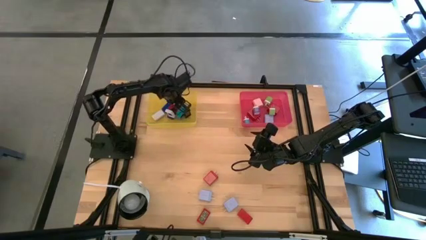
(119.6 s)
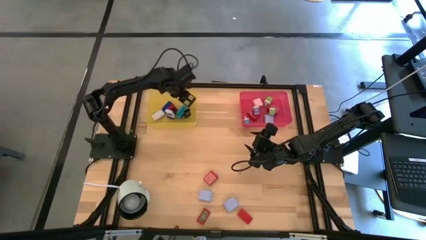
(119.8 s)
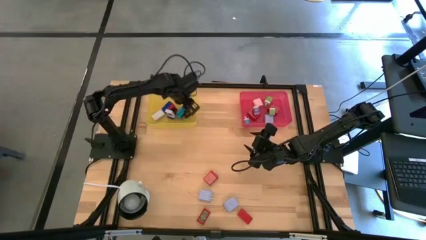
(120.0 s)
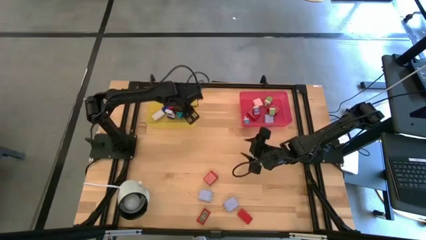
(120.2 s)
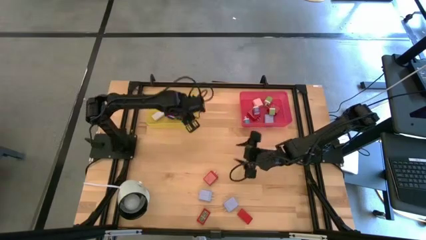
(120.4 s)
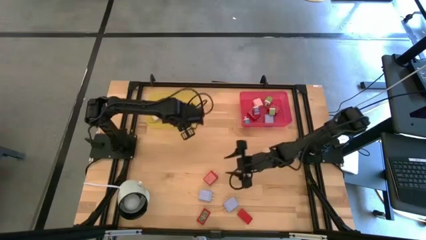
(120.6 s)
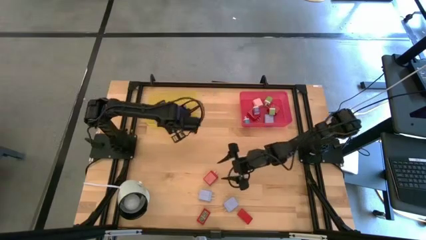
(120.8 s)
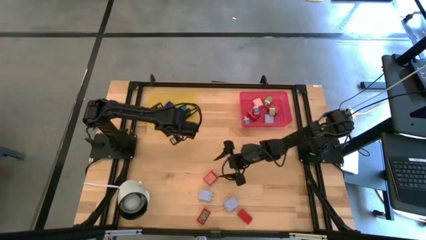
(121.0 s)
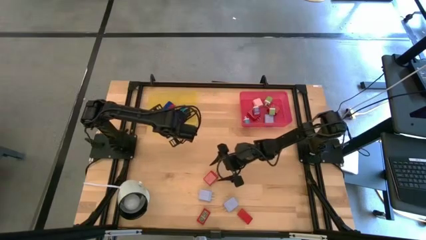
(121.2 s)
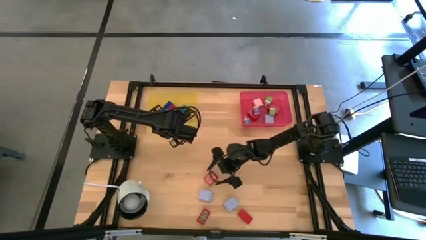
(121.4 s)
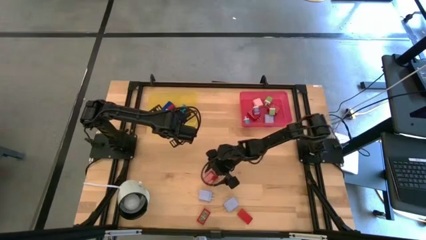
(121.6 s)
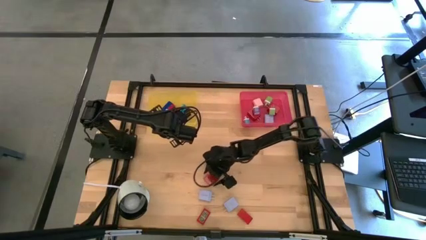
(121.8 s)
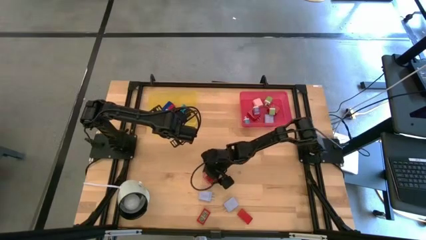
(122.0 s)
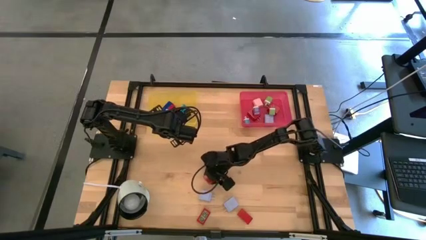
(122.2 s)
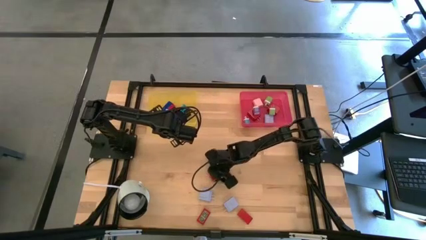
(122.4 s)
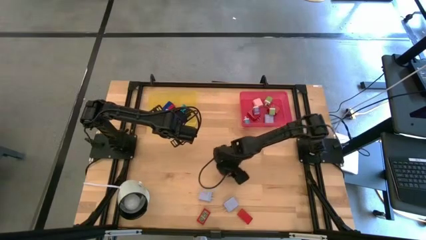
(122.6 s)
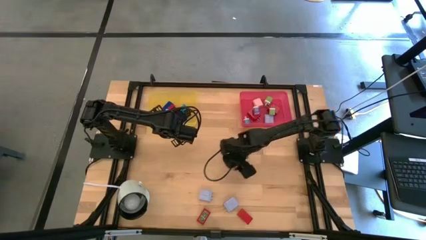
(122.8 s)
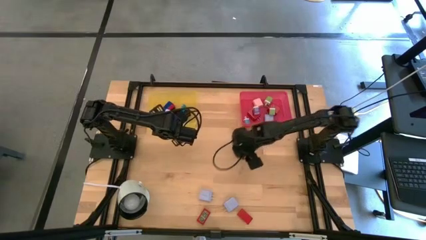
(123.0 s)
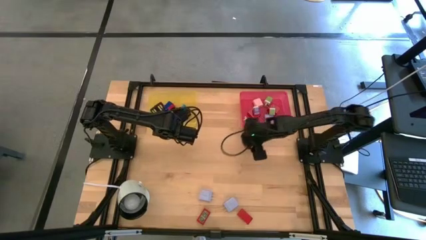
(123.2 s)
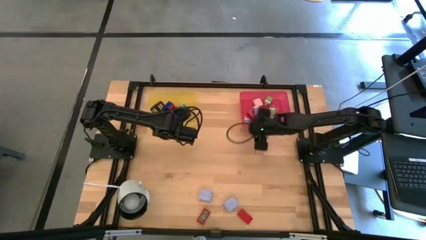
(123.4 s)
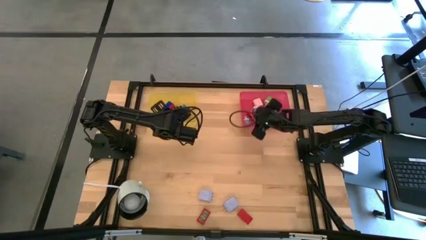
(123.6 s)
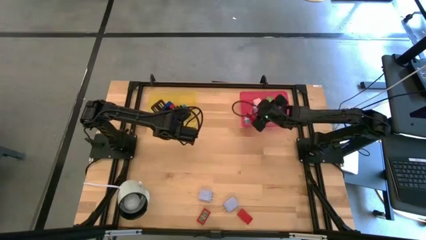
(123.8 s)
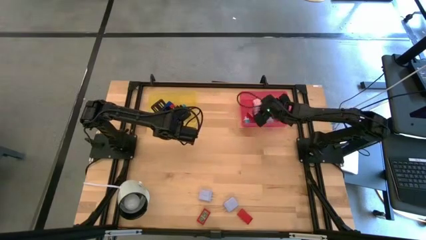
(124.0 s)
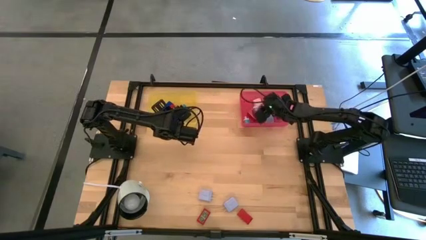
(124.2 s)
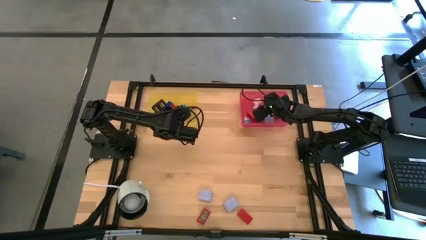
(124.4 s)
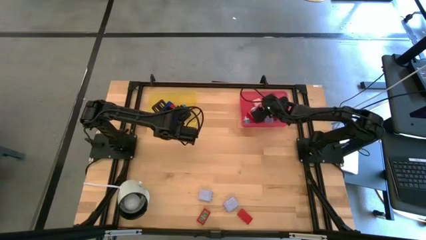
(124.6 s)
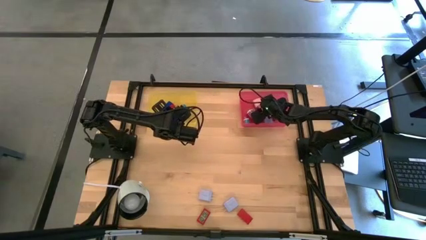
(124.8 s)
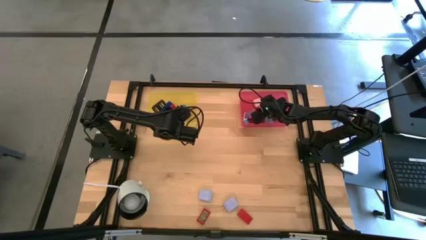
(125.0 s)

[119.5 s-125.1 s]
Task: Pick & Place Office items
Put the red charger adapter into the red bin

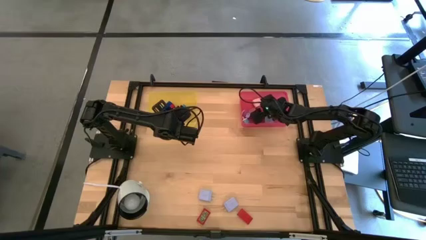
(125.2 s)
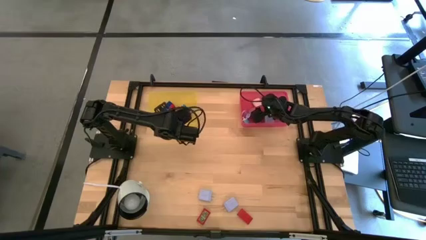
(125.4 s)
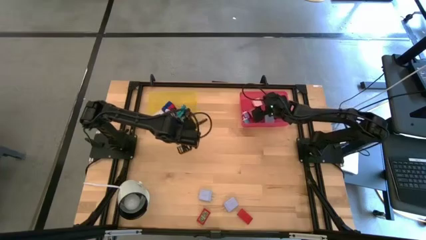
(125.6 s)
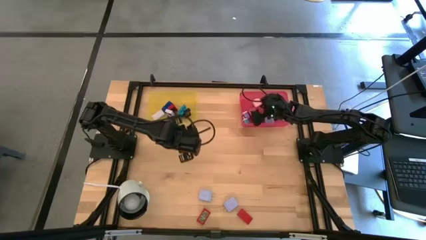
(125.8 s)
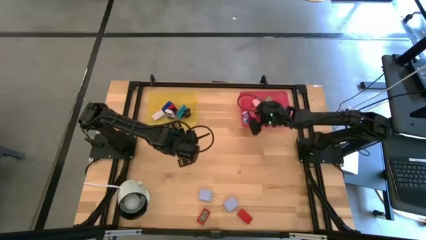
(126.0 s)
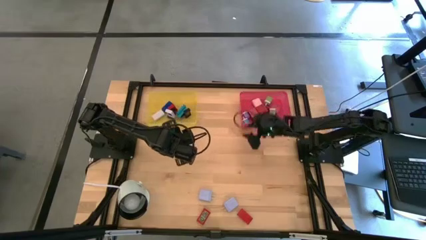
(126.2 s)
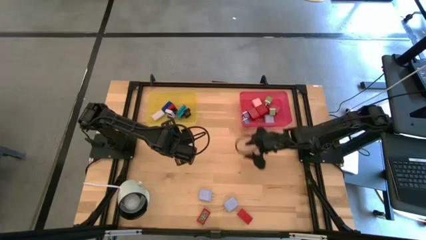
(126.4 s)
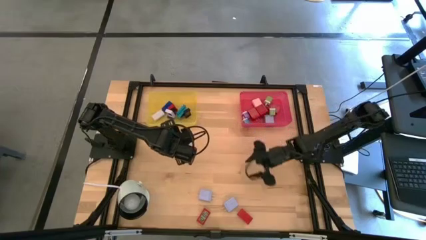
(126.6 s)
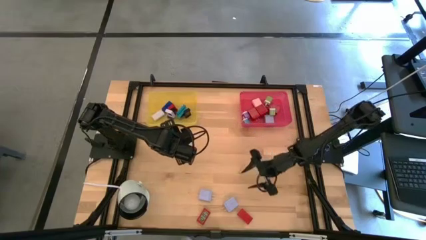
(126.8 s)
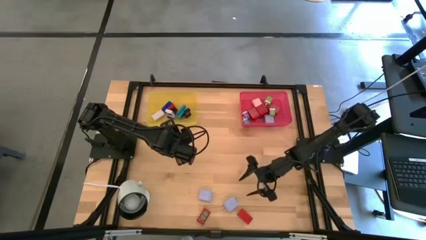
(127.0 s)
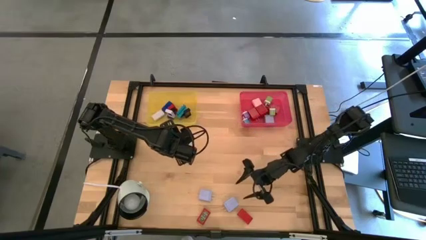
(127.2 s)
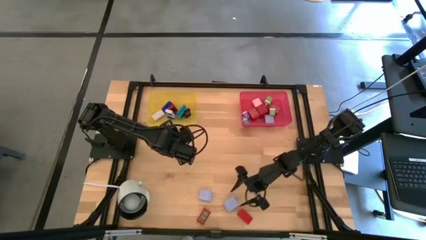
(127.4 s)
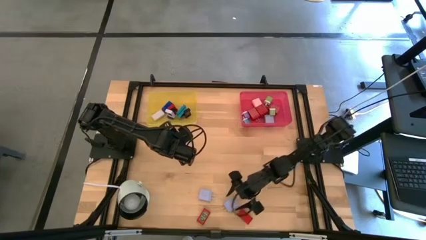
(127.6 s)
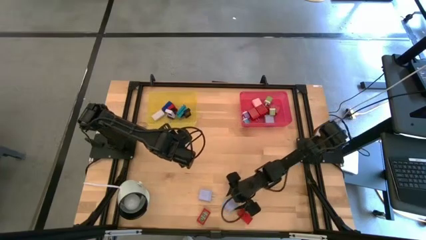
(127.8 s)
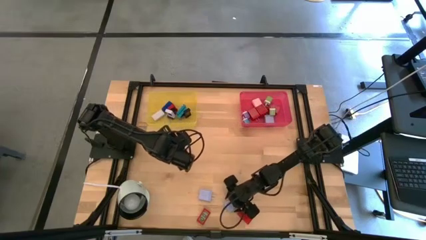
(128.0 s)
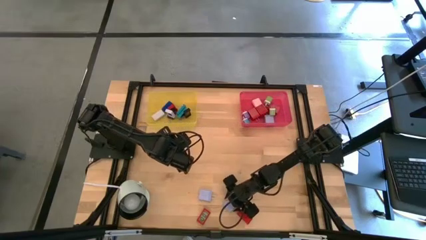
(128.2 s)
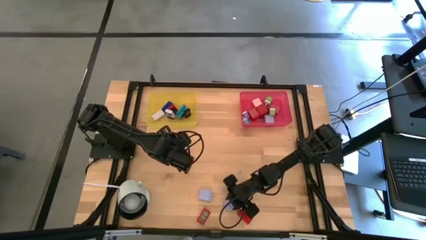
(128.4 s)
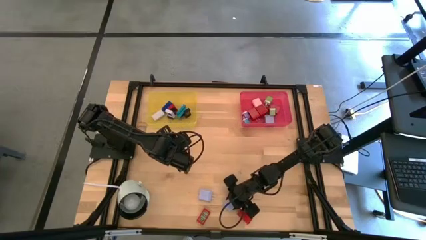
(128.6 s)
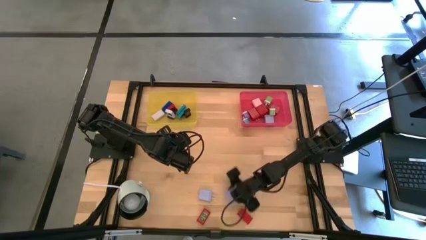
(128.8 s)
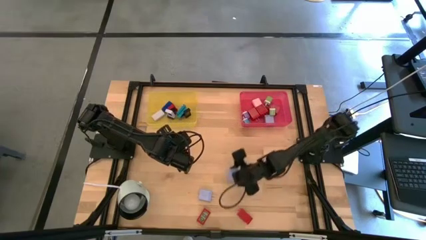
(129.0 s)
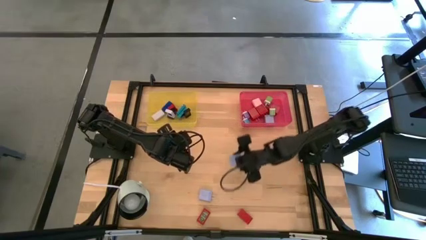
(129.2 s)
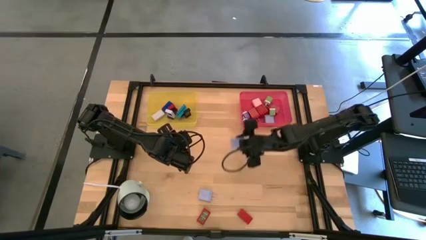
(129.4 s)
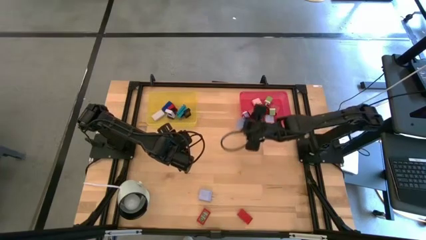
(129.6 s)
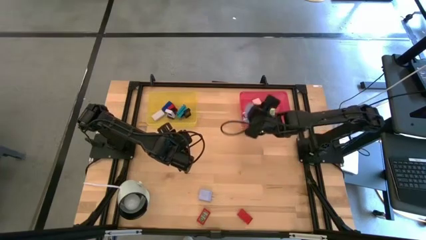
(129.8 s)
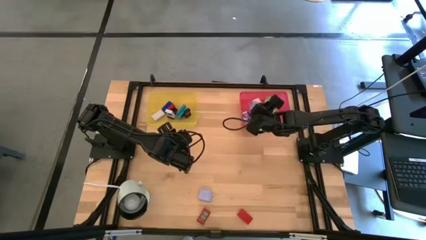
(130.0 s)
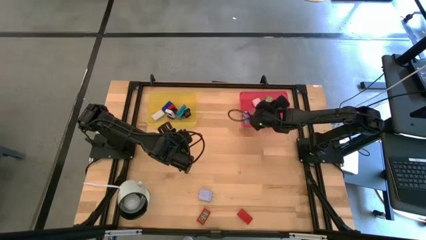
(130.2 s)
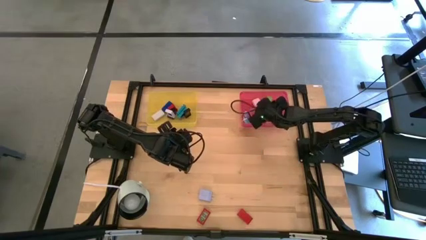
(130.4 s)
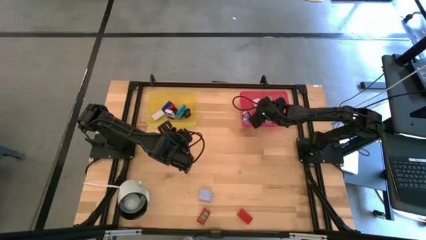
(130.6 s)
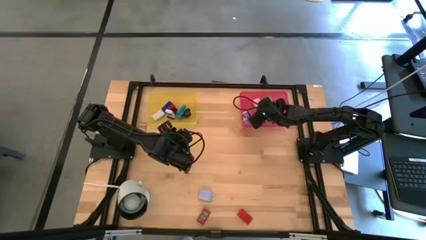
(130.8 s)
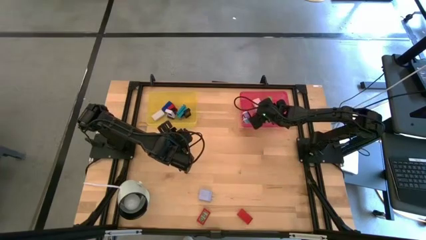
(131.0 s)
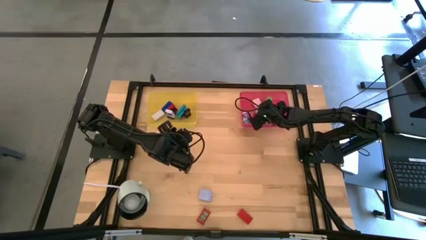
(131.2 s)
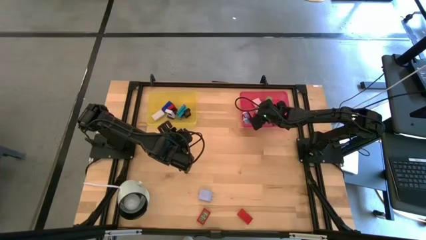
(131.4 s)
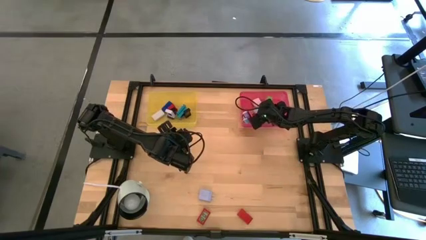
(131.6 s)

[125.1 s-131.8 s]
Put the right purple charger adapter into the red bin
